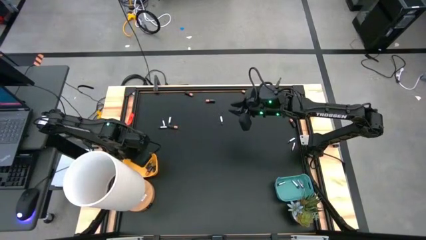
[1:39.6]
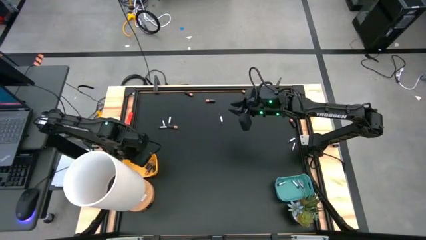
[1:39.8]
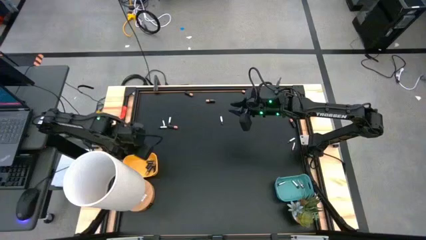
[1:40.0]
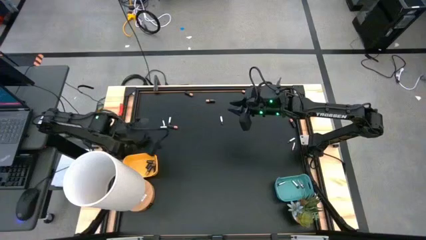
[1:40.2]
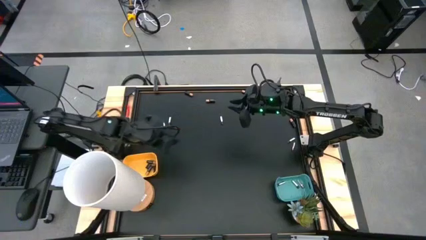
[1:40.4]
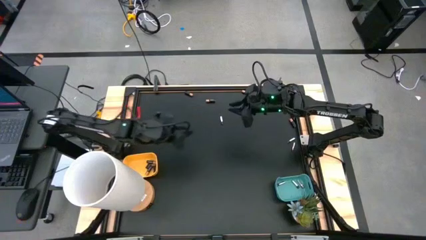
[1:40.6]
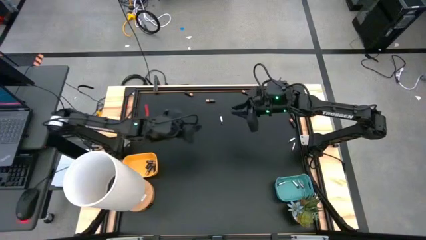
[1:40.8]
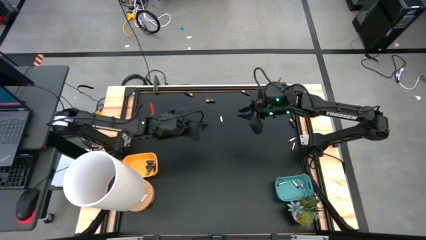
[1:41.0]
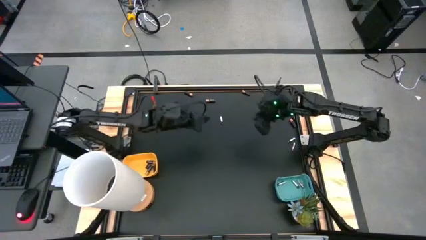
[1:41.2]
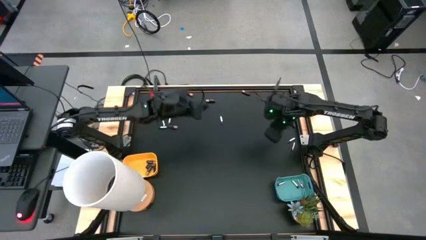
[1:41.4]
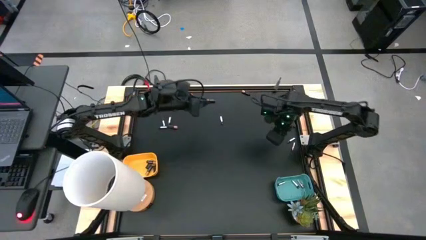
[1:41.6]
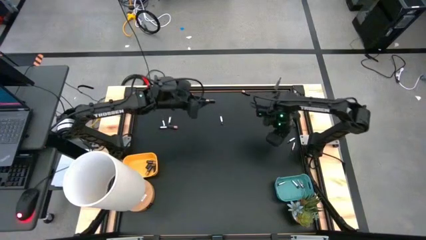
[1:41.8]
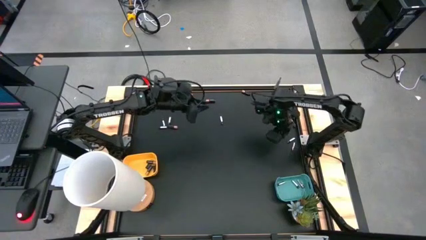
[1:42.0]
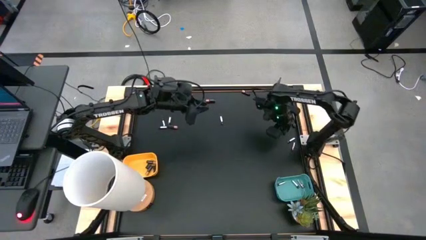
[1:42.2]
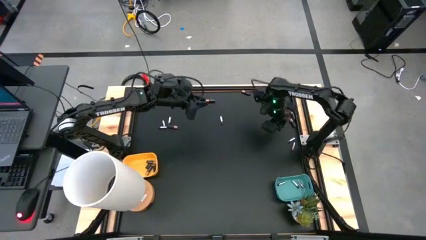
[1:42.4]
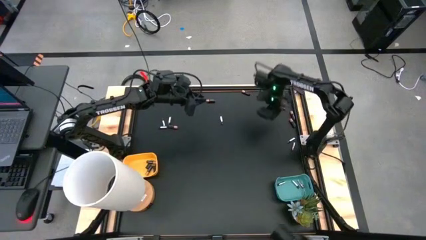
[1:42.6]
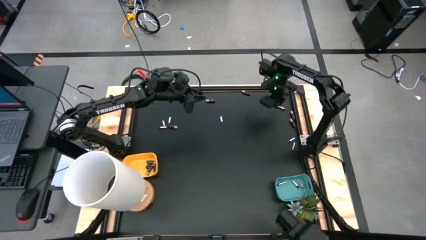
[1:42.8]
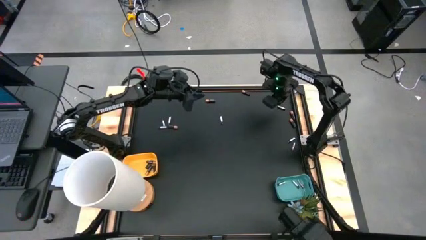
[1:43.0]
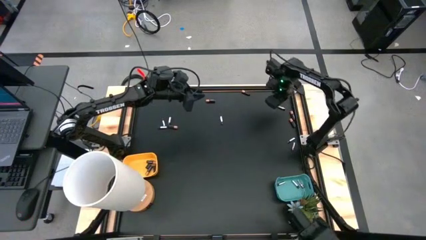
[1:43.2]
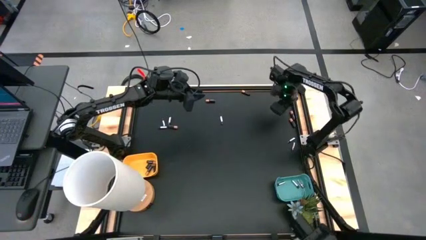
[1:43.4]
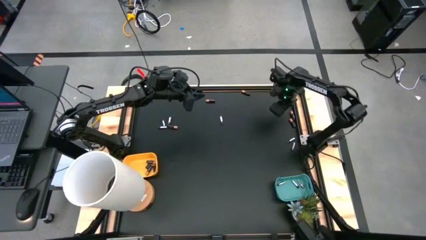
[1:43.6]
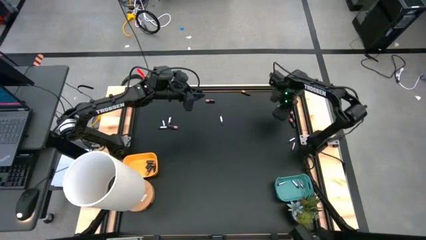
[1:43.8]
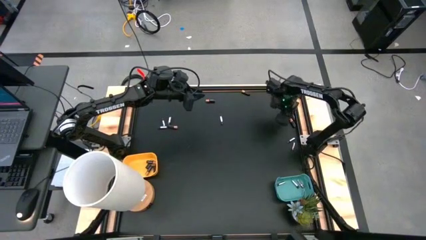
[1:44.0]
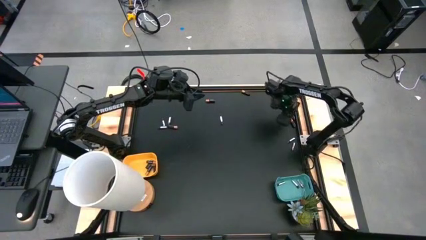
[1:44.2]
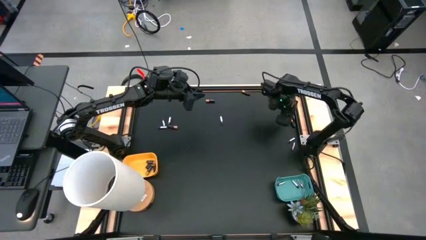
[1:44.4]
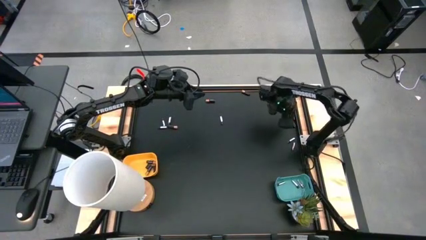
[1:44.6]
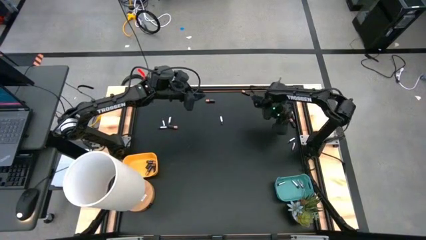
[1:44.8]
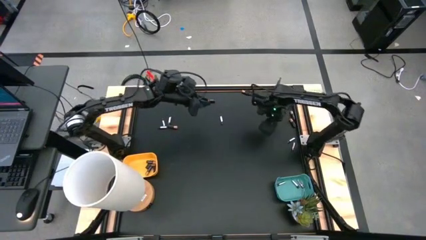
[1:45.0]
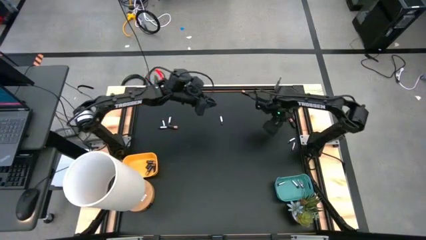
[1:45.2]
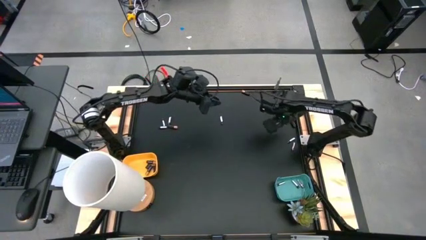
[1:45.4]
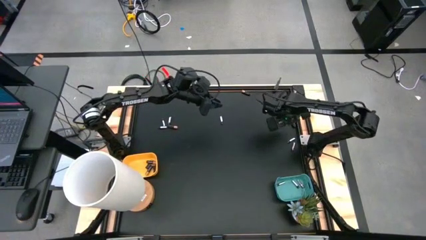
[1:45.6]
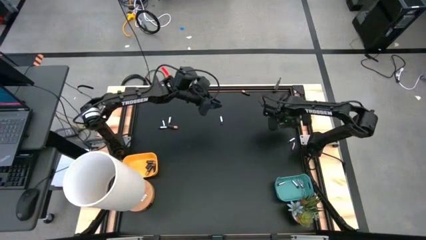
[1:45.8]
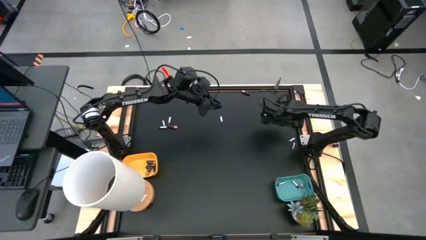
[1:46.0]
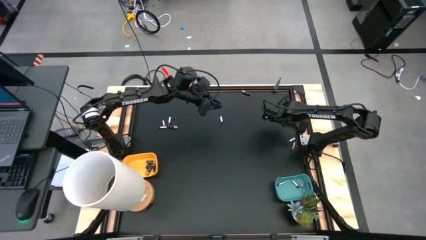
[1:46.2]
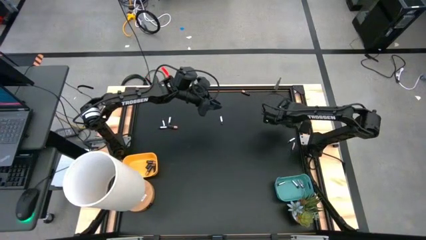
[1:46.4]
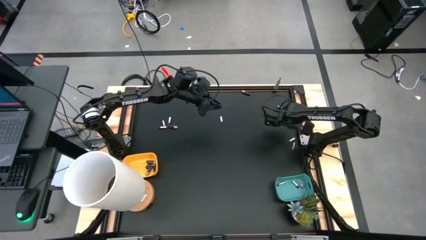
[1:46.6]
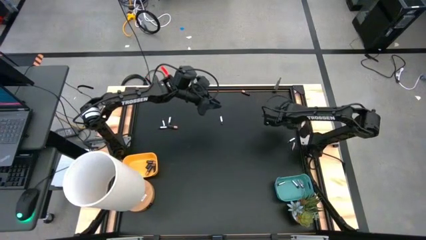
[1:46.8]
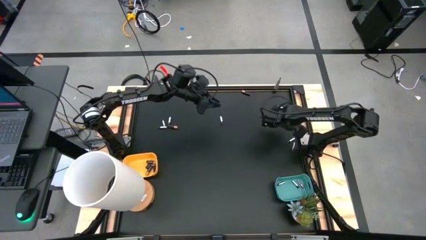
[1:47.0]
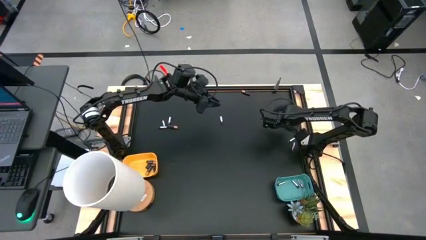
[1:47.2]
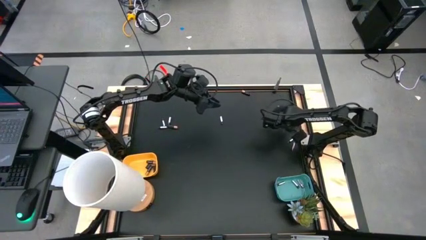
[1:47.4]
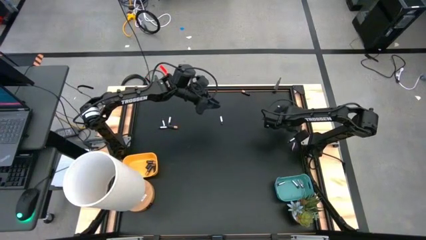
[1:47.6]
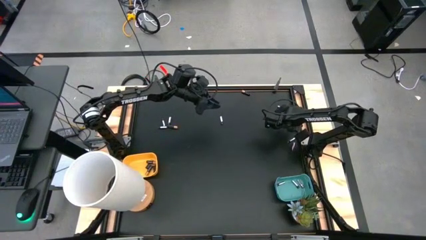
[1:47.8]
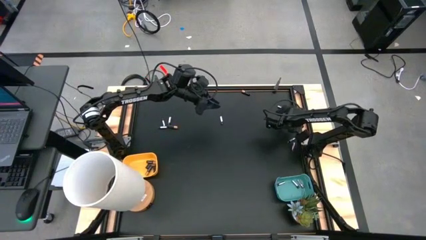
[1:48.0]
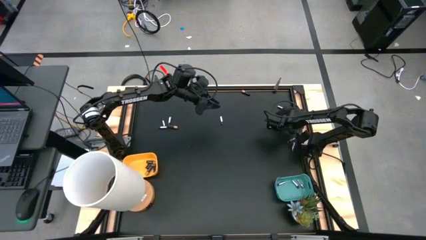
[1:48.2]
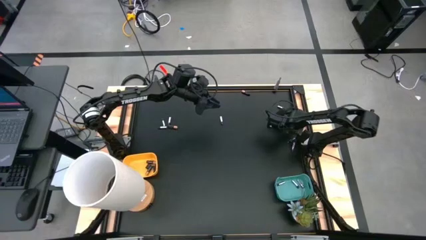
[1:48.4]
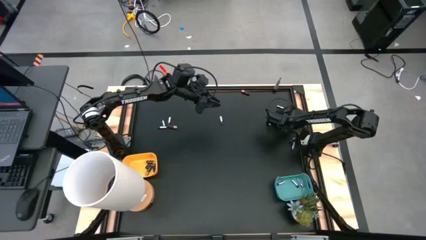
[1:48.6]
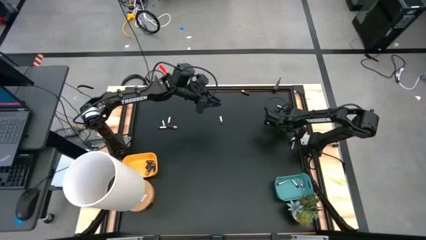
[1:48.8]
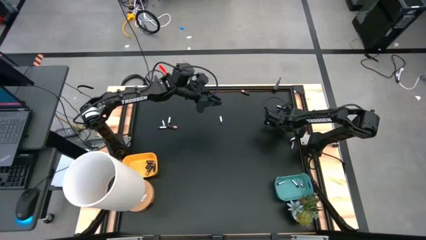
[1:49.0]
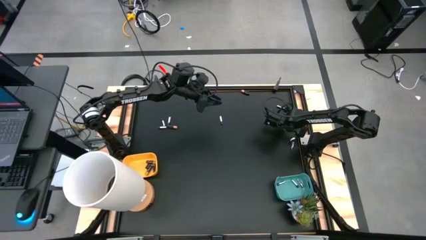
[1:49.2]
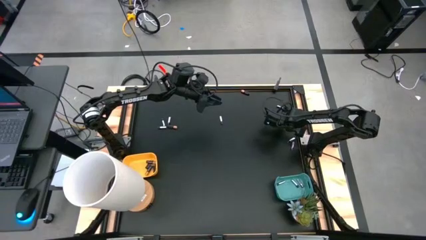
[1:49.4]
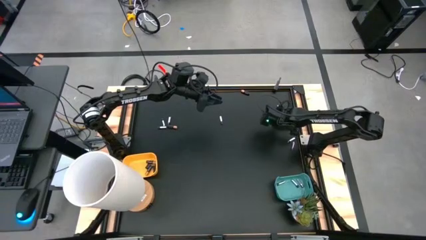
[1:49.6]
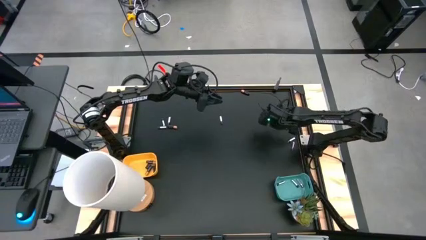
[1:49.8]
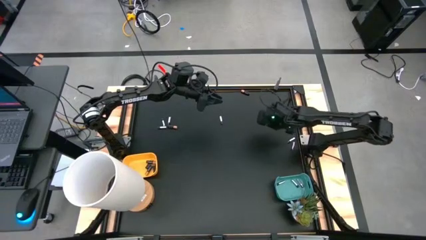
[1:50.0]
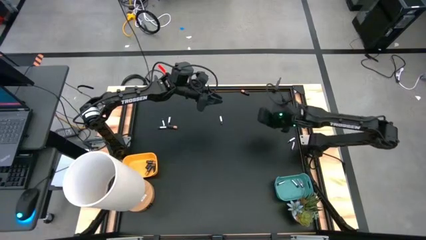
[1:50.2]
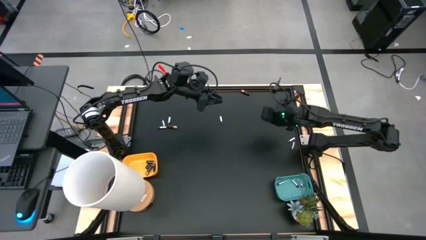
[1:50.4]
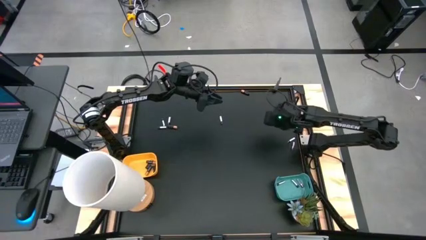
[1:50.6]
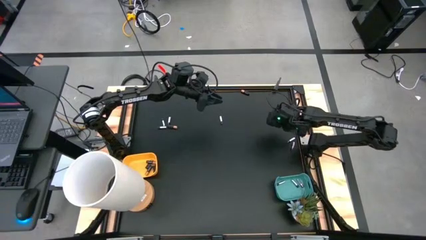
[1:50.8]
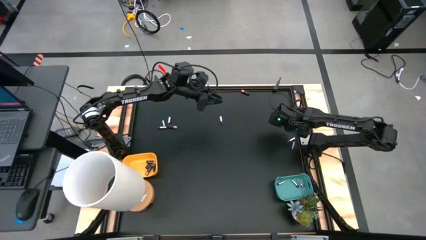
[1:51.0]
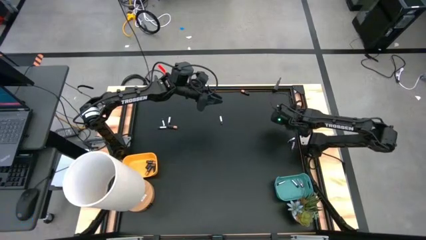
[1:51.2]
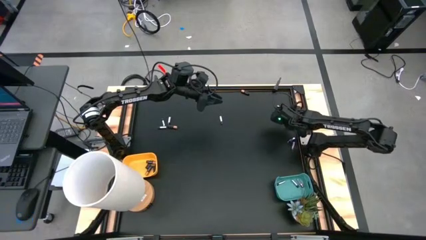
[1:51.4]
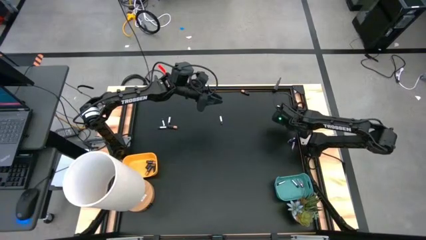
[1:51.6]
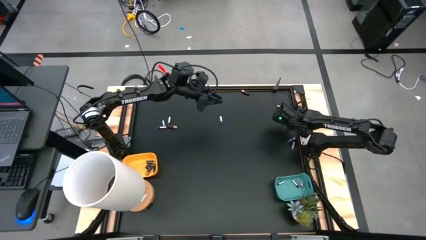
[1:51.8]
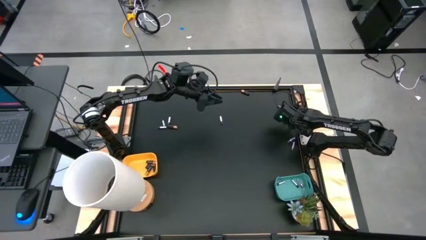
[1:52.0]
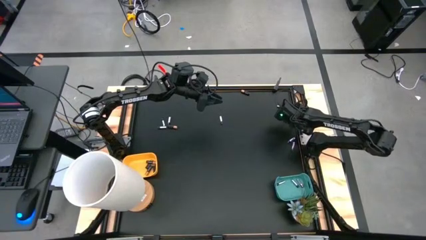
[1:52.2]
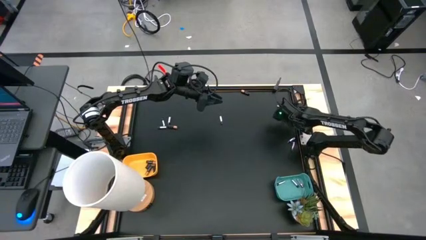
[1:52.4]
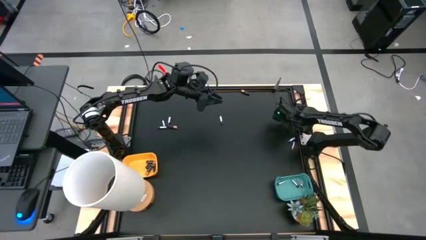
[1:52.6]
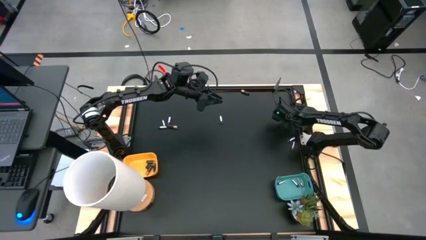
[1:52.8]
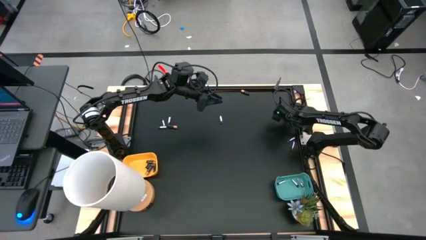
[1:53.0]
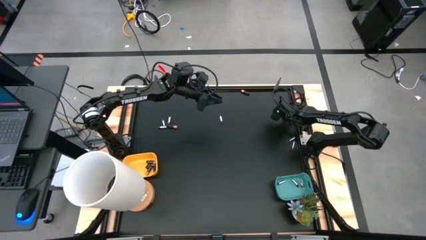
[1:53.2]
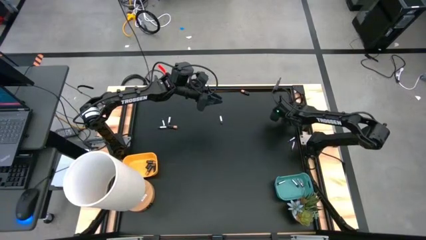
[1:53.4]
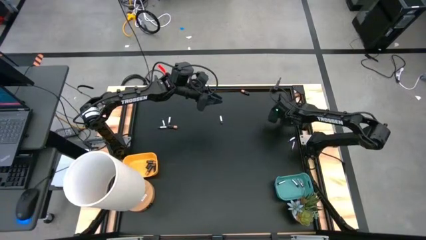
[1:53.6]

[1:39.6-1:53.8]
Task: Sort batteries
Put the black battery into the yellow bin

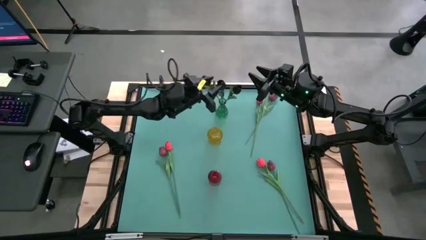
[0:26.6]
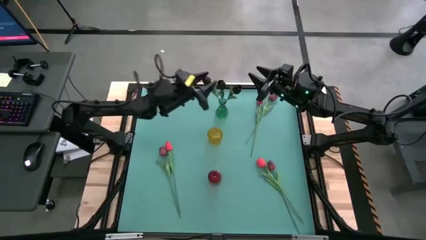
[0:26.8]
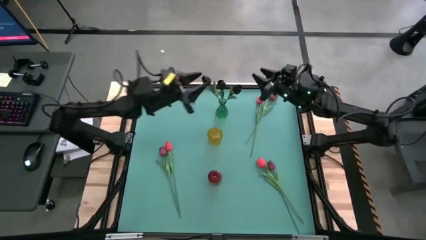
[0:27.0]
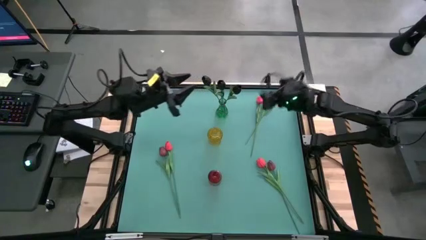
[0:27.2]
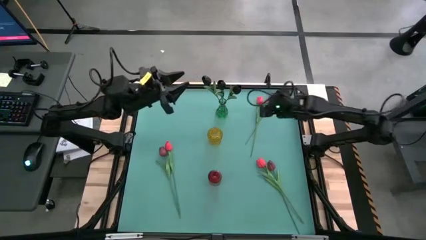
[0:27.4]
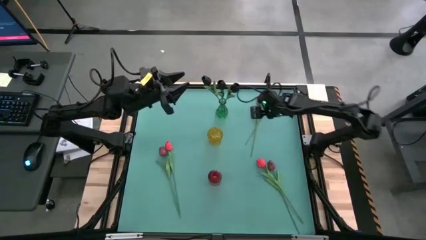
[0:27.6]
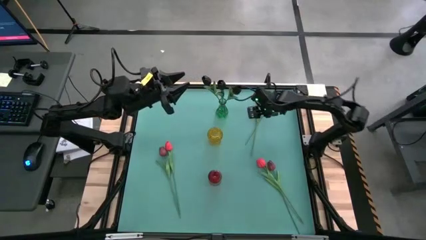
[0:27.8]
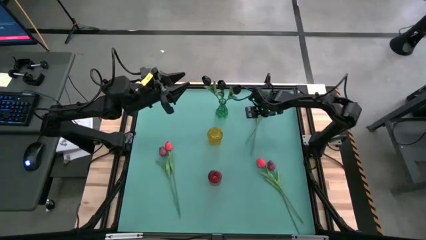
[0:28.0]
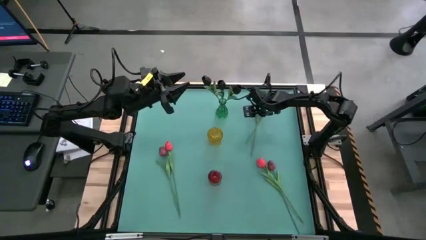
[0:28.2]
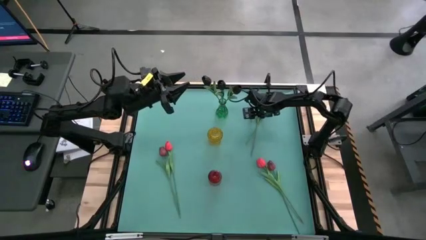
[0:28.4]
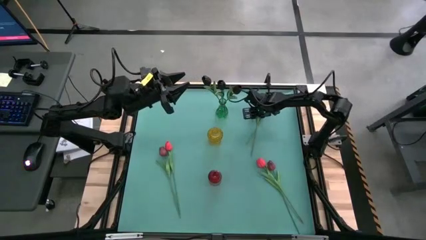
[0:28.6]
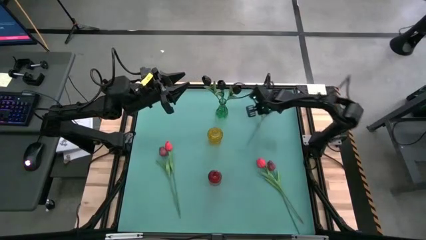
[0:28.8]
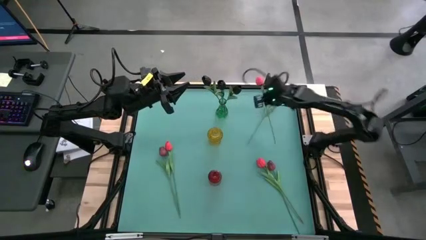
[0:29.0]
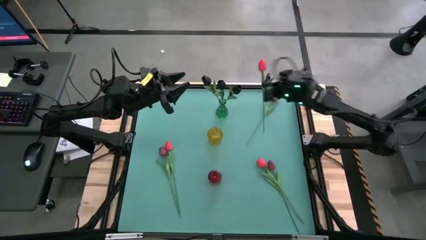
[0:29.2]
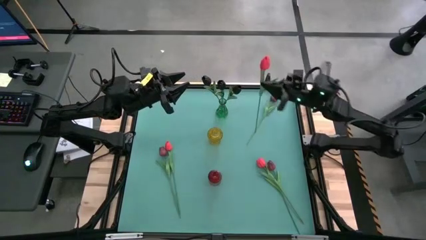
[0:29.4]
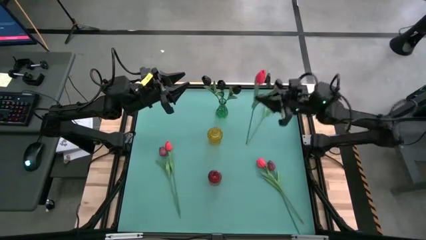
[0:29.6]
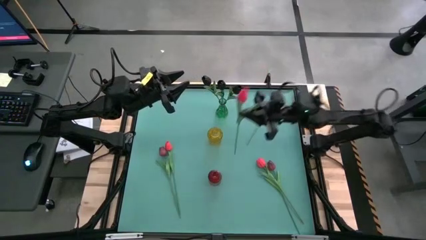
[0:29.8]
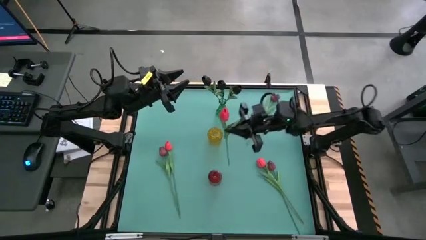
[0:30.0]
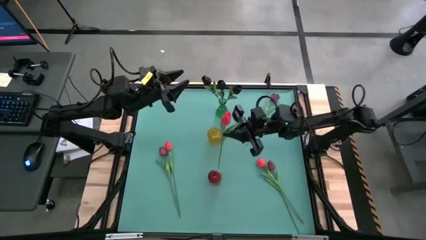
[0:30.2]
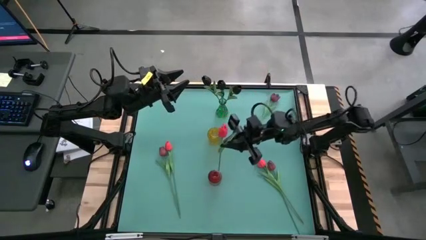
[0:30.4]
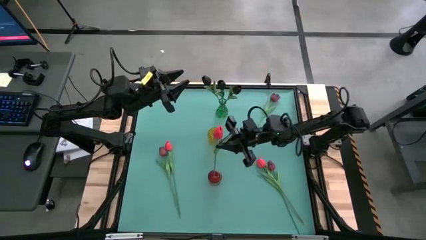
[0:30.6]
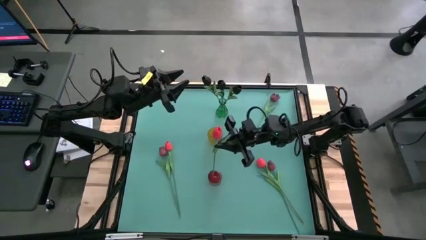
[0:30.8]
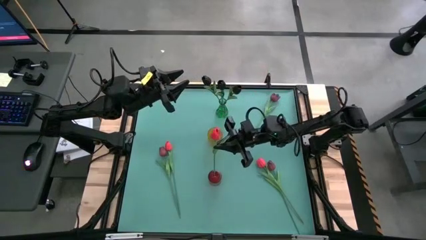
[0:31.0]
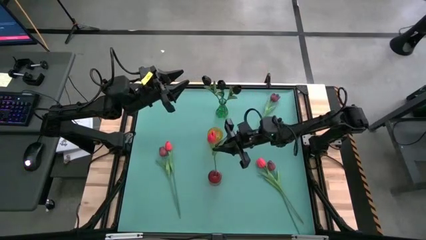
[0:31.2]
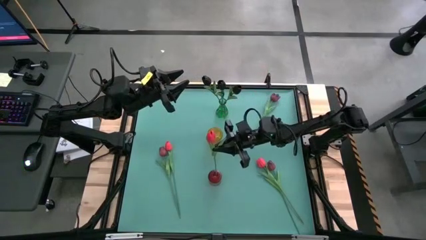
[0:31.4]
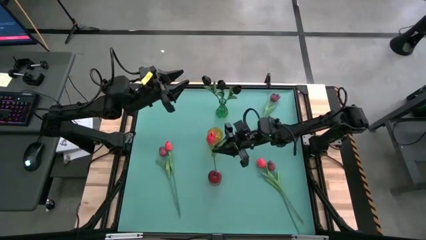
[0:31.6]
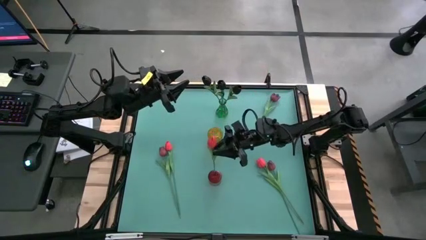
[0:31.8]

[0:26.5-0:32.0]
Task: Sort flowers into vase by color
Put the top red tulip into the red vase
